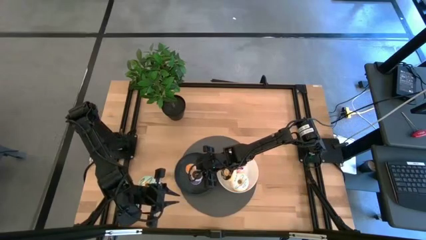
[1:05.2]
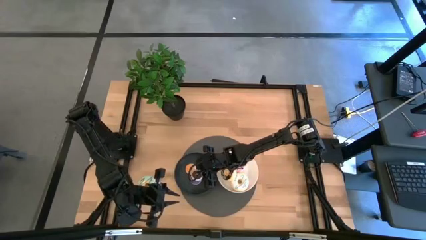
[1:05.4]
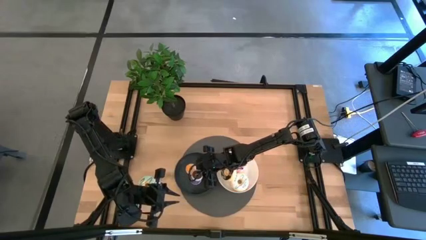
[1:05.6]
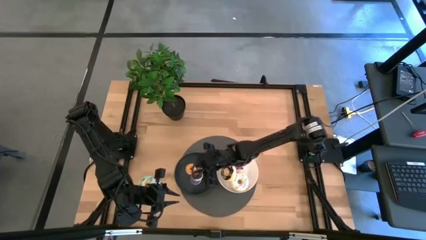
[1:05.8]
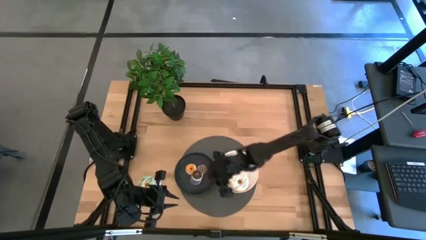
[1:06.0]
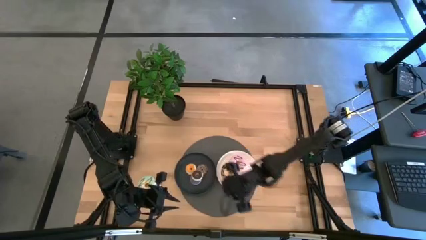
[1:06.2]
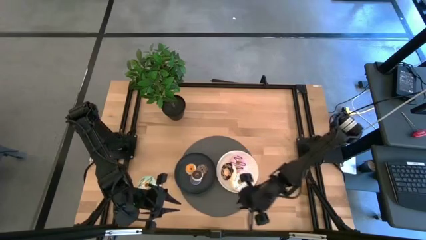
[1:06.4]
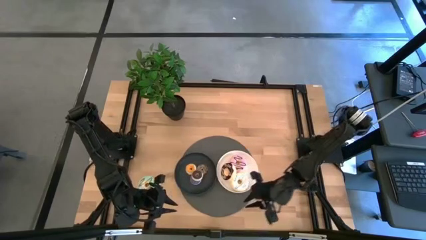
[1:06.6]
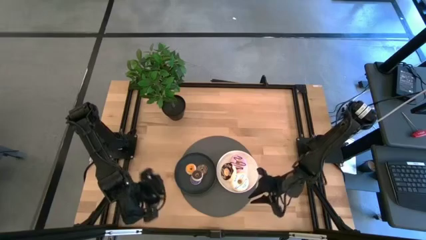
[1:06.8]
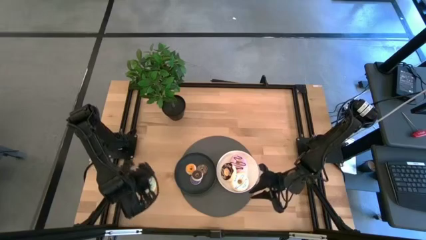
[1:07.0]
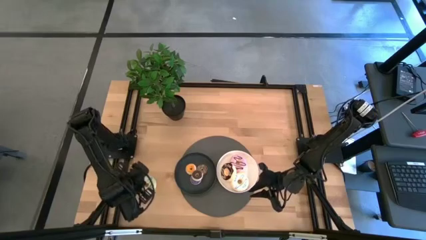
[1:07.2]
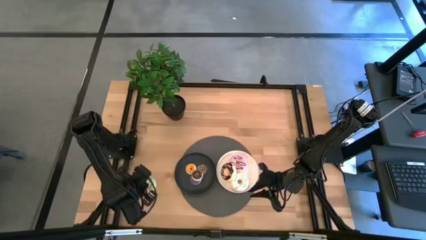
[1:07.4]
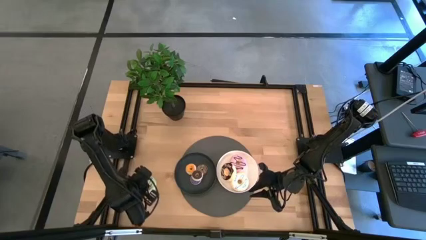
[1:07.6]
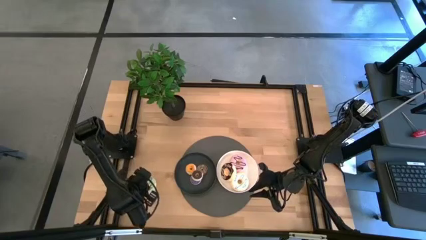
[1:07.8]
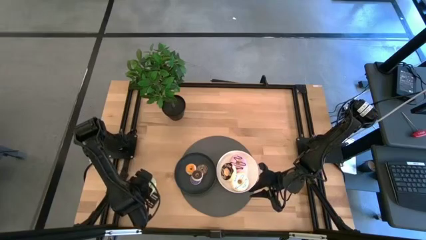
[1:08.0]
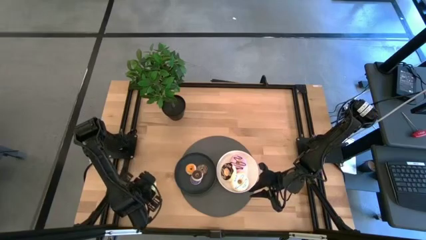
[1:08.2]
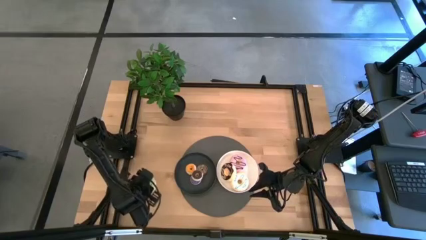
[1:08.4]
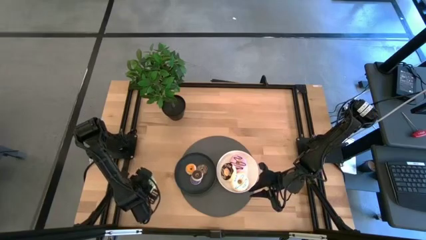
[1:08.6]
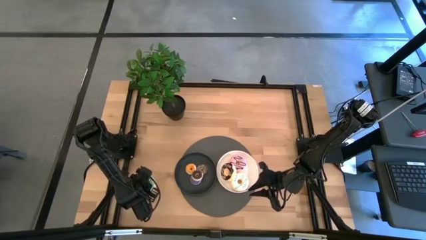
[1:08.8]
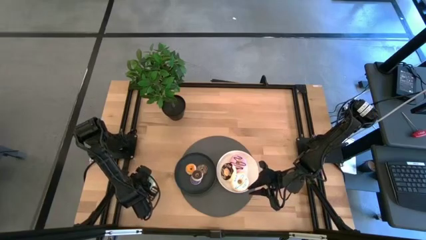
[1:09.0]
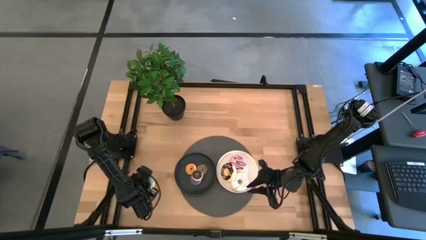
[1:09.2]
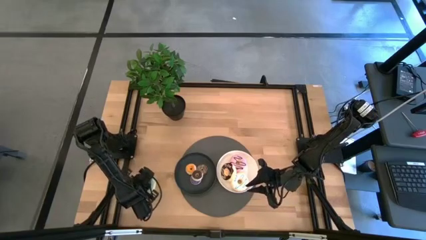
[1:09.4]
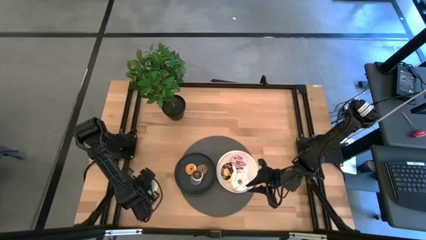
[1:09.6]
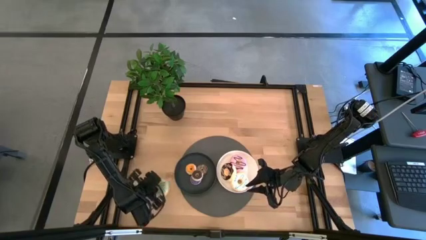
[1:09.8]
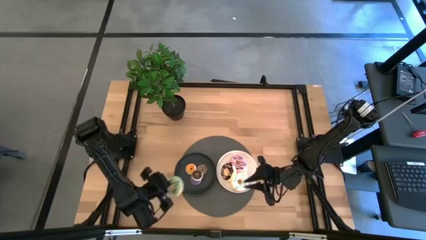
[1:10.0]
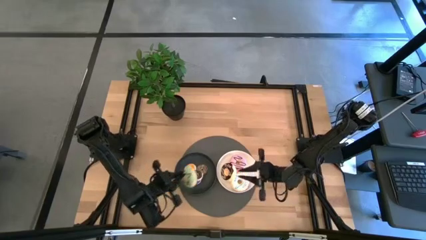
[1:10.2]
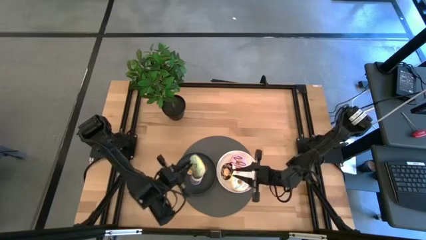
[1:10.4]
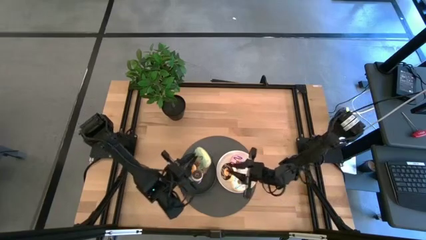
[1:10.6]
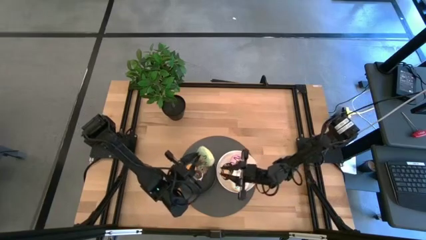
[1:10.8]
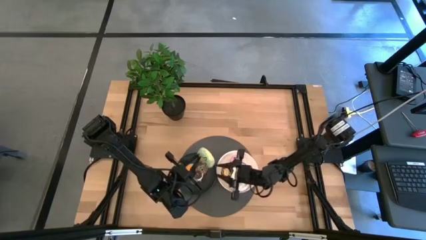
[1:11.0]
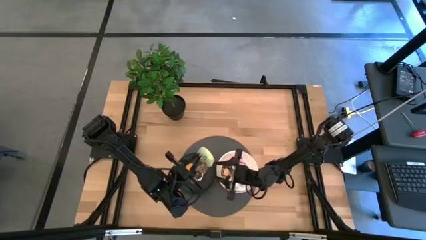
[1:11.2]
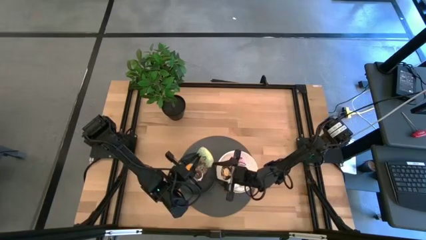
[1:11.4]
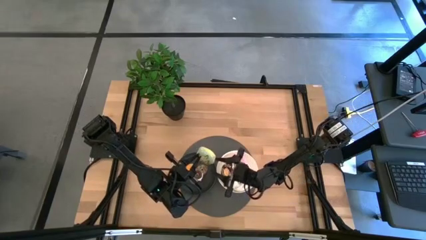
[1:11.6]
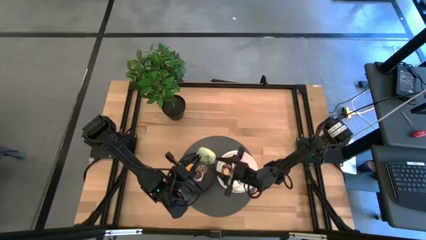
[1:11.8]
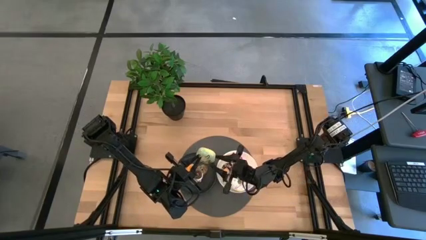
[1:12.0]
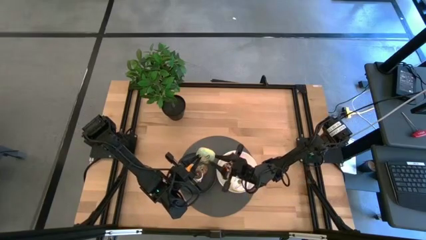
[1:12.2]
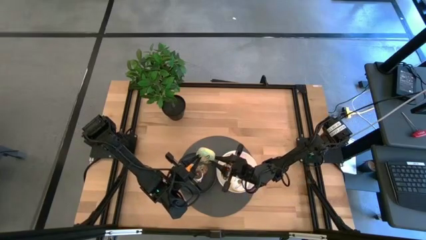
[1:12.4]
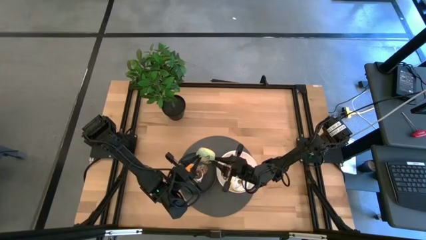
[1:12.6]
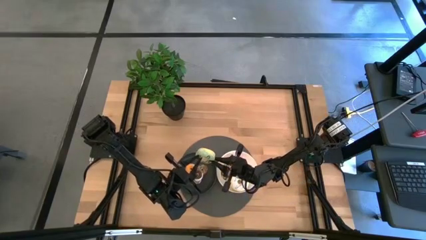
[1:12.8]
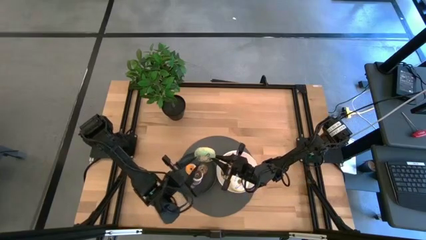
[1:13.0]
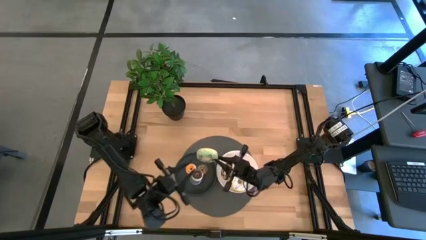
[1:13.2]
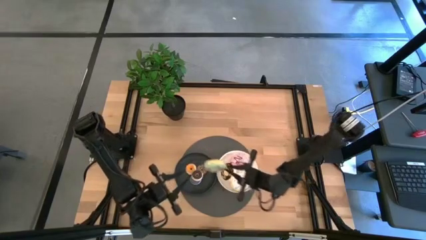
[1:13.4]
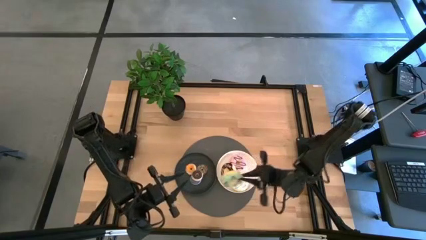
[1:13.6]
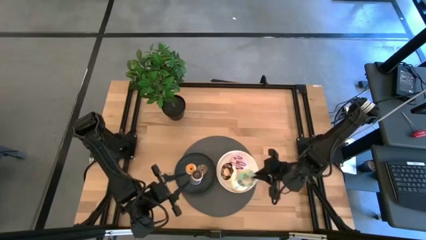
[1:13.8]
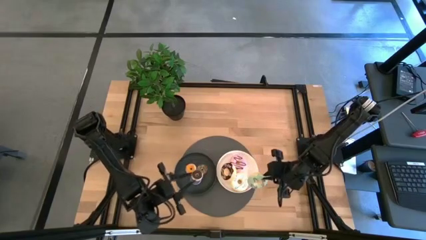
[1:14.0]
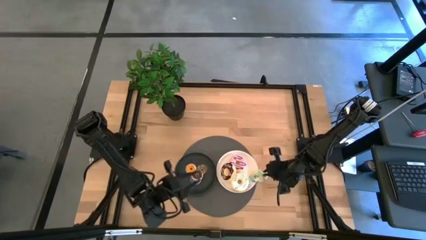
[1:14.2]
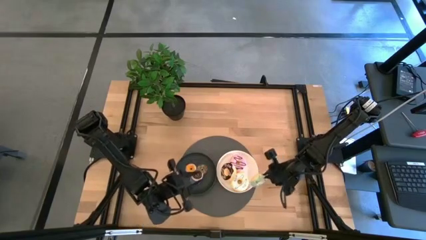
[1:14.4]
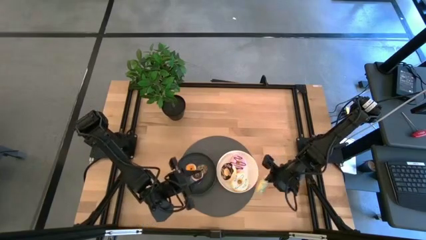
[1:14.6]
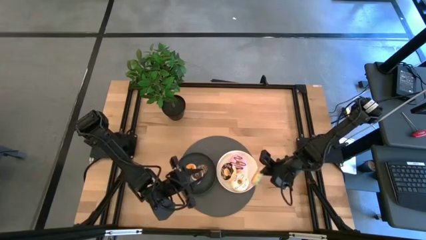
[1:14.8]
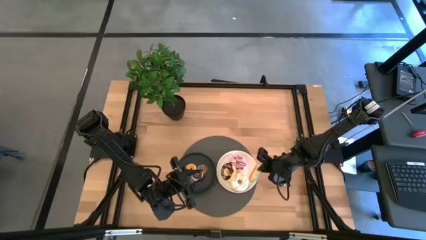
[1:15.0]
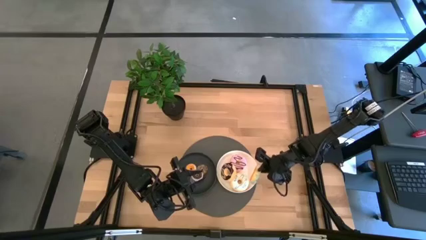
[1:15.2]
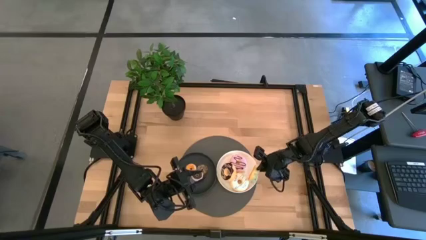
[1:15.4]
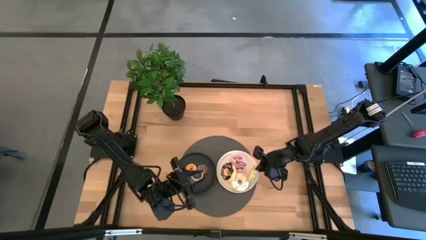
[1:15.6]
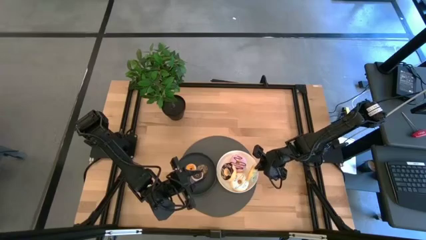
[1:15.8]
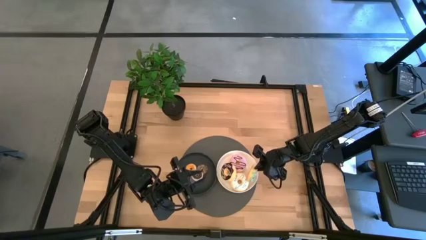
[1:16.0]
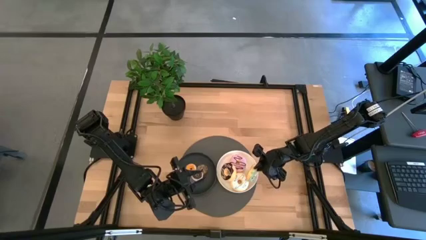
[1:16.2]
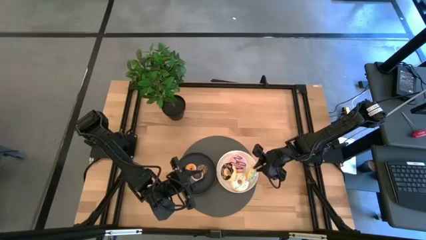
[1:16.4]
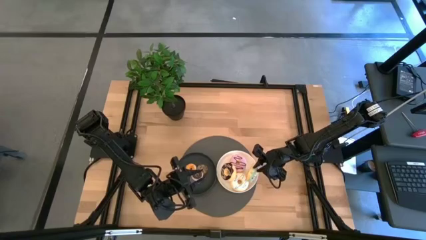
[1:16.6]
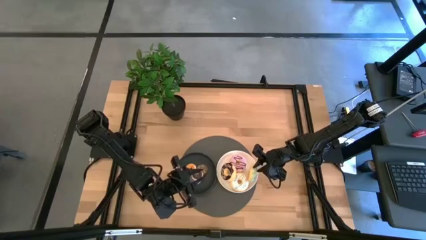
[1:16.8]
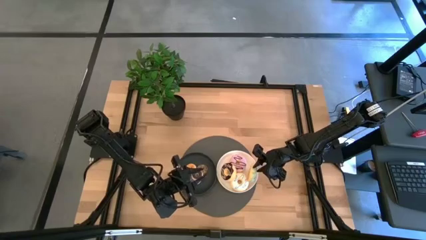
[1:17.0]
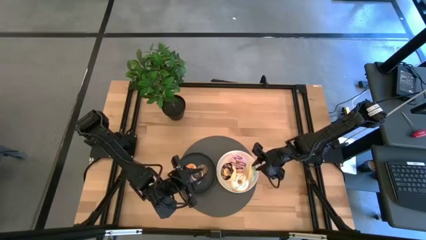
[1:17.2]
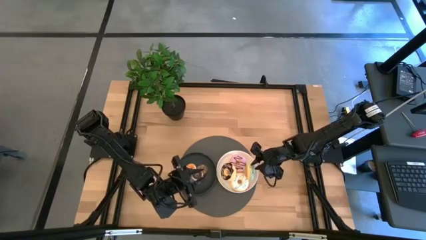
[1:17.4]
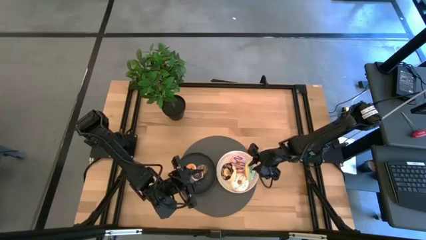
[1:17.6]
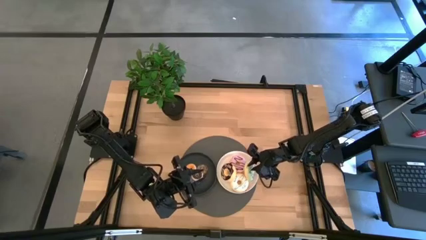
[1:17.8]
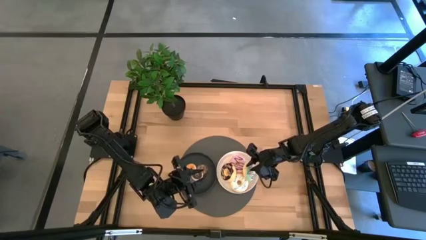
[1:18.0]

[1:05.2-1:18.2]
Task: Pick & Place donuts
Put the large blue donut onto the white plate
